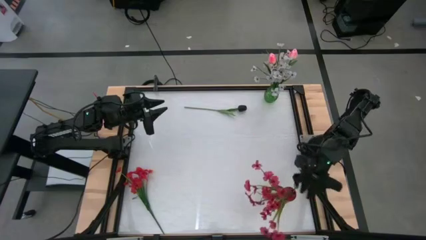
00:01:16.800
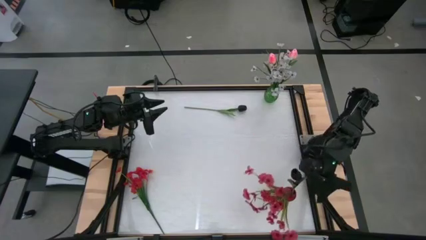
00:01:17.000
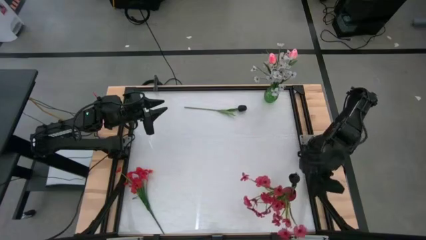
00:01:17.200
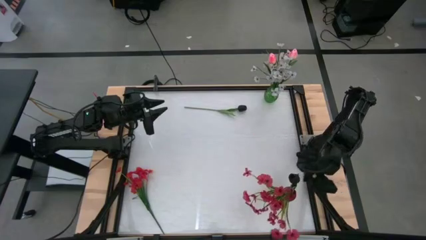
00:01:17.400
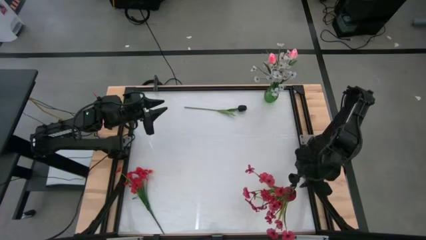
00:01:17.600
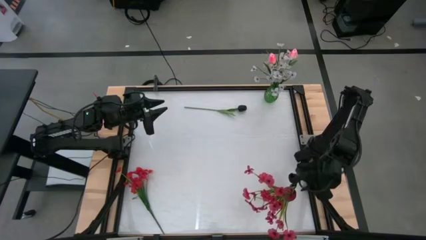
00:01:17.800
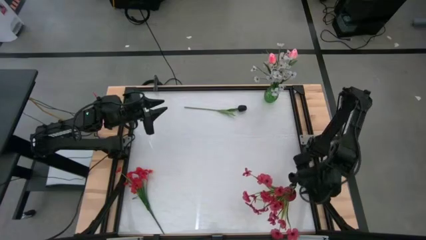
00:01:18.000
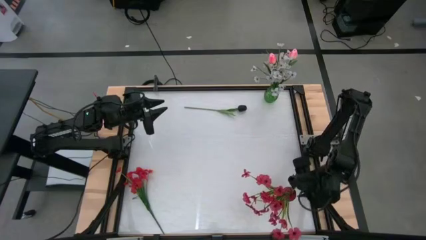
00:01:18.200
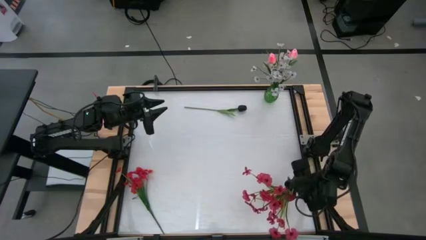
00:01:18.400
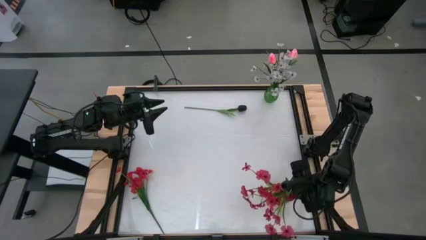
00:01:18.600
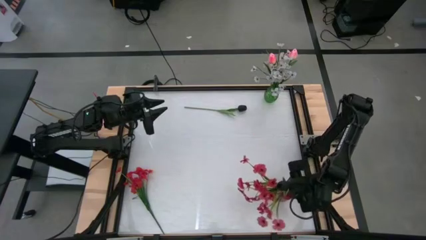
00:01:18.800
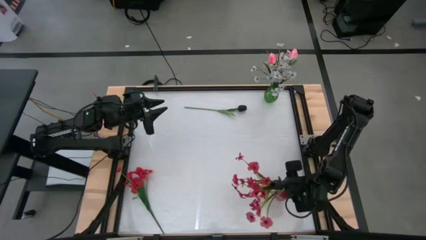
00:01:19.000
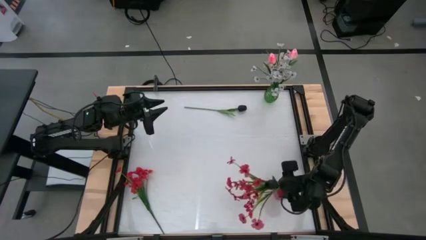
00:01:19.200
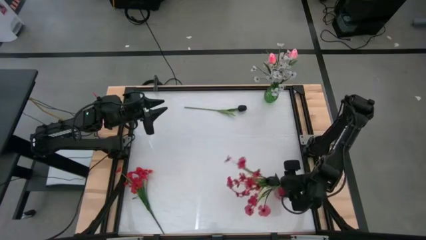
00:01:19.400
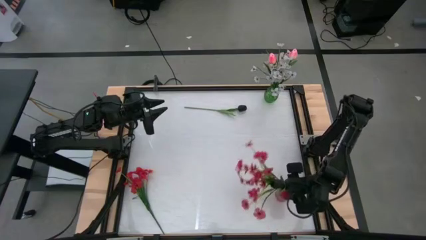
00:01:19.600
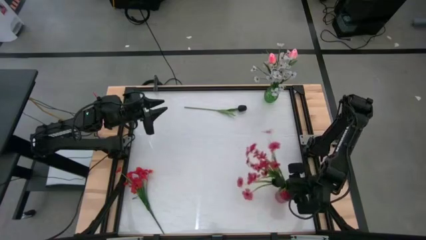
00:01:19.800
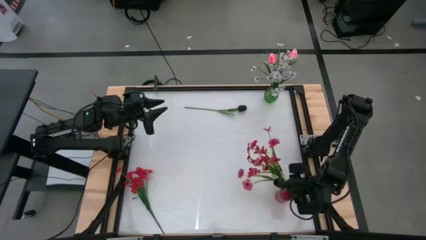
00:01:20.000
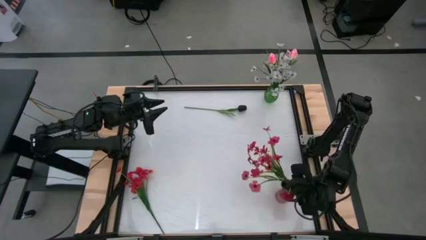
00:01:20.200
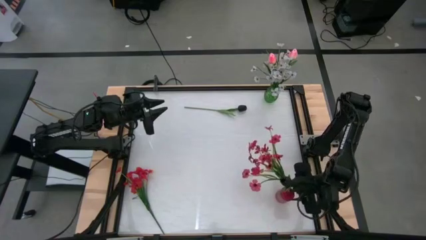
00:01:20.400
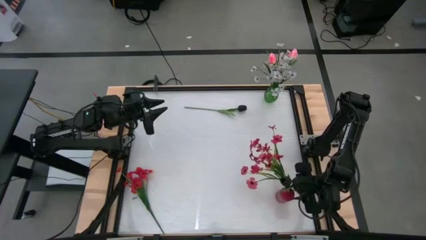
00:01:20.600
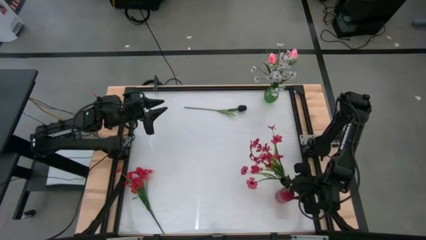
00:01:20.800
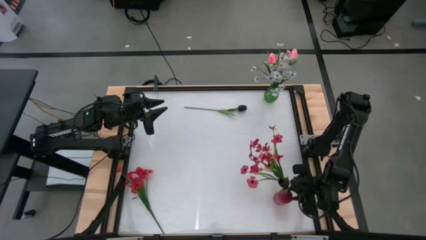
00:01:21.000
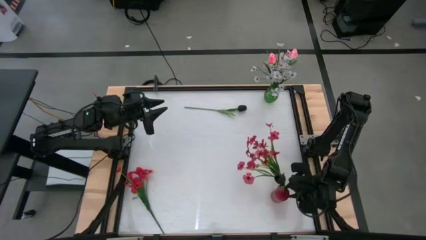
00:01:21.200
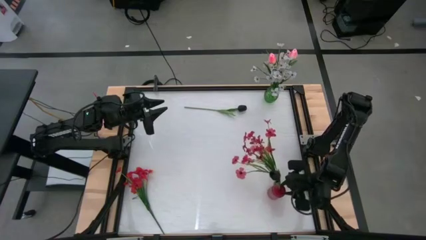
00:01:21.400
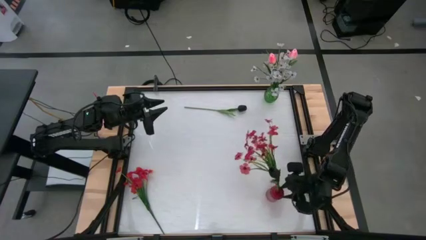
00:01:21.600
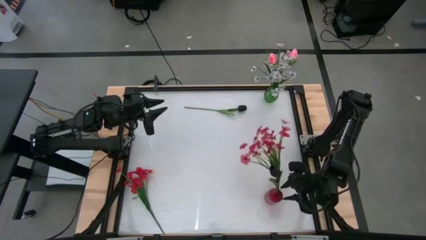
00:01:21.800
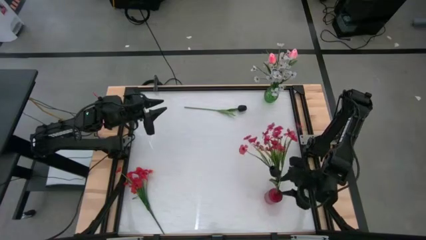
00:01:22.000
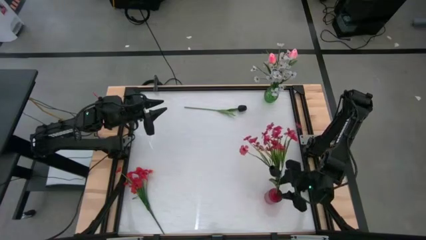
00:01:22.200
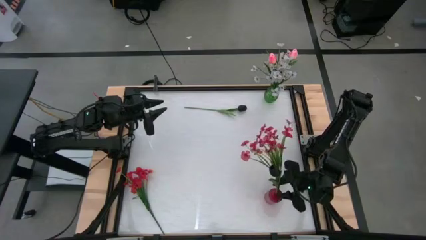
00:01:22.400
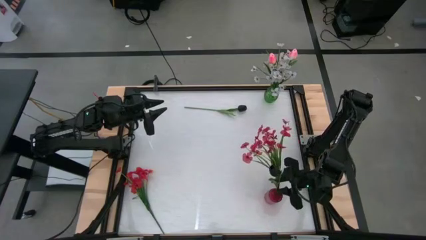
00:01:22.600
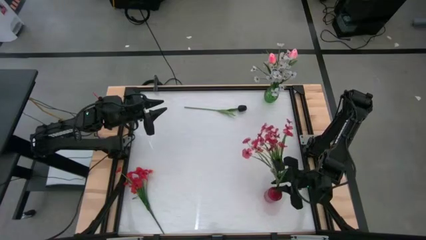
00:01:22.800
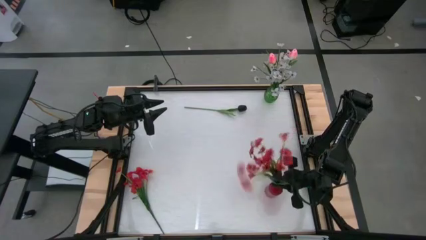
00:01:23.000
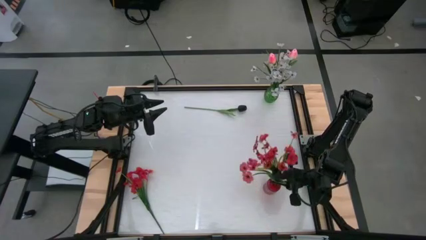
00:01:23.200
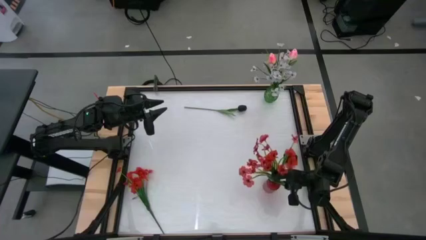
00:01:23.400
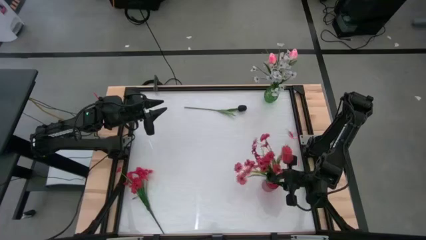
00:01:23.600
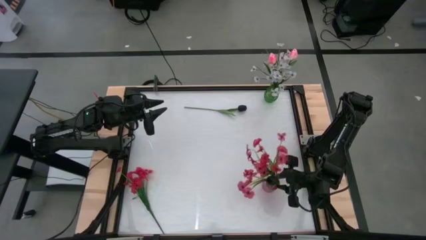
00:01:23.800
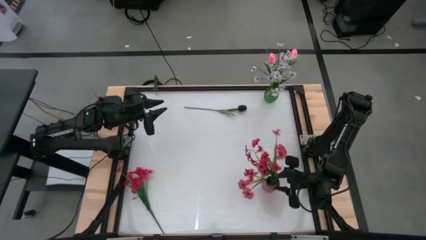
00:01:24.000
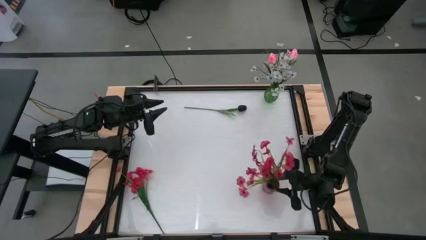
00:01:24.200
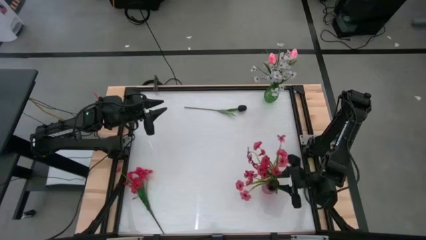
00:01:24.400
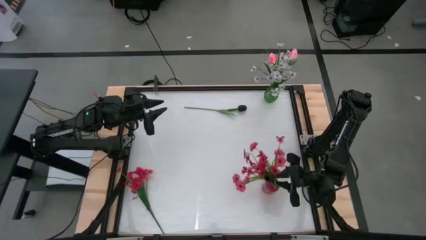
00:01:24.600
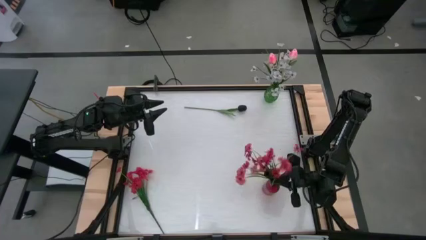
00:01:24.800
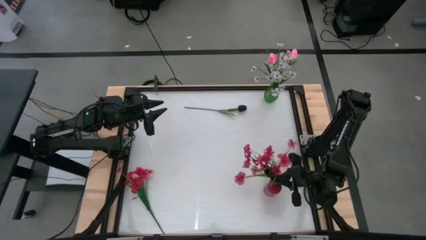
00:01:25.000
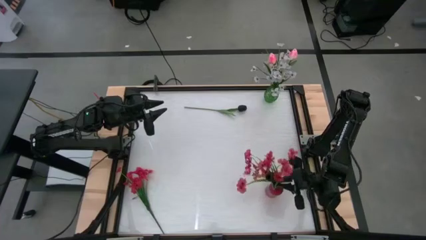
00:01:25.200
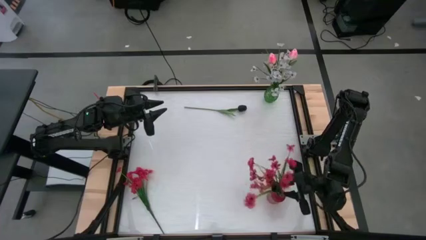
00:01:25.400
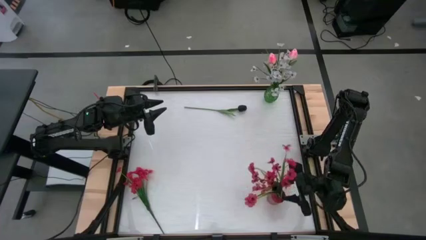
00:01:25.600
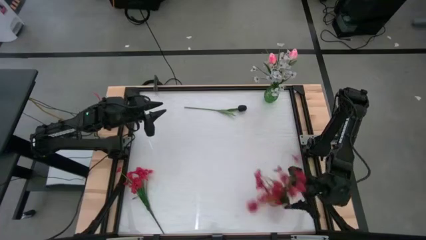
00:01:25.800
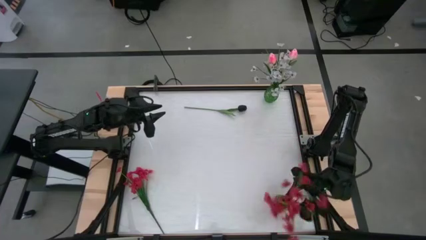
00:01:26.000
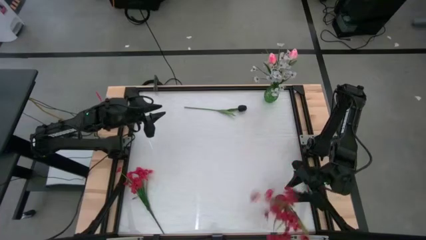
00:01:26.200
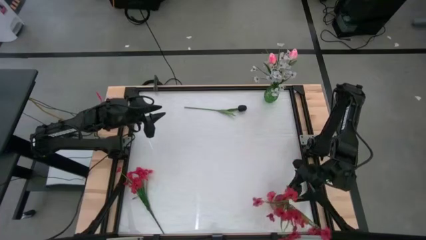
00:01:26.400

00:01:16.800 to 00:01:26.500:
Task: Sort flowers into vase by color
Adjust the red vase
